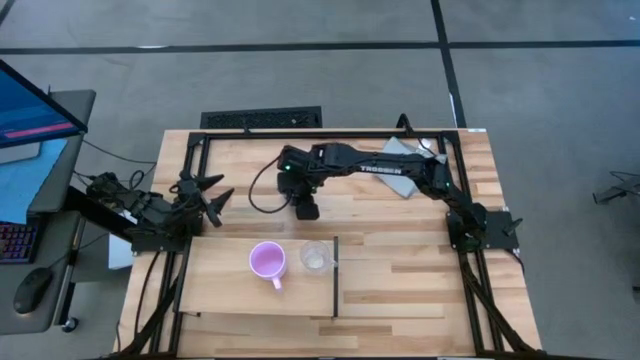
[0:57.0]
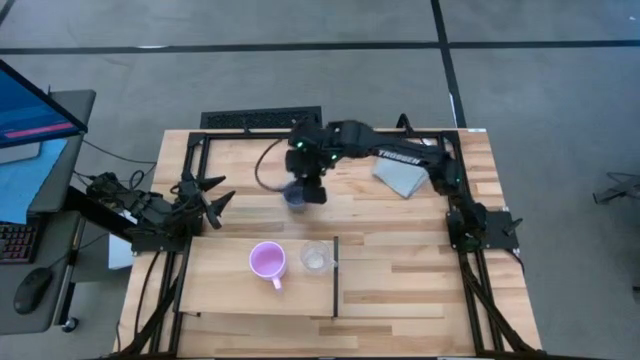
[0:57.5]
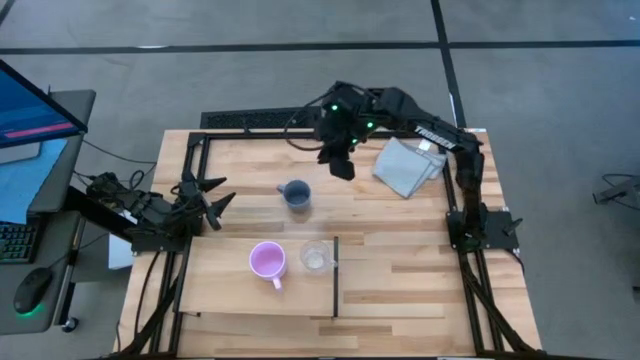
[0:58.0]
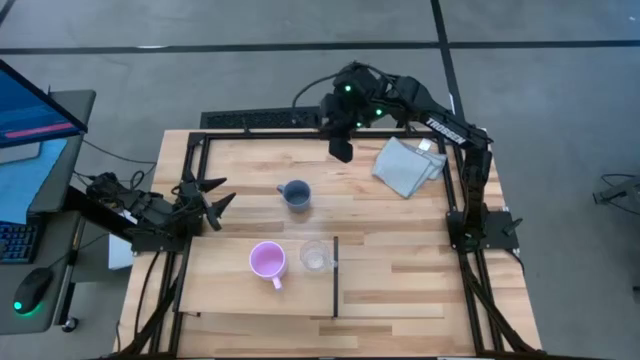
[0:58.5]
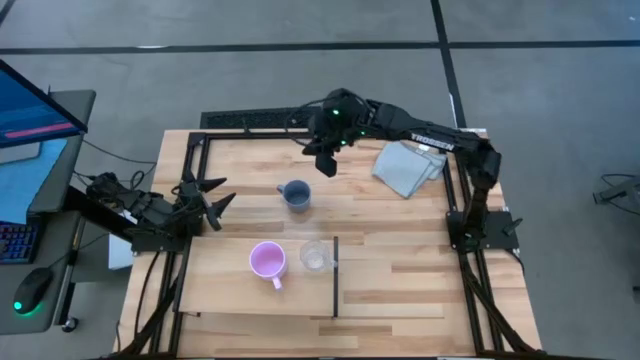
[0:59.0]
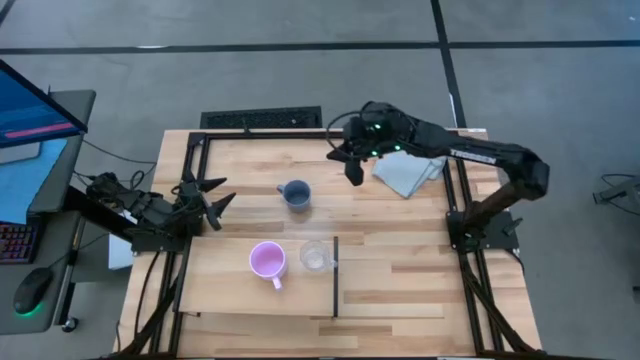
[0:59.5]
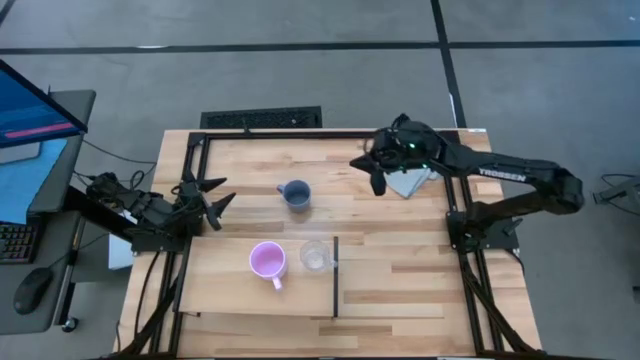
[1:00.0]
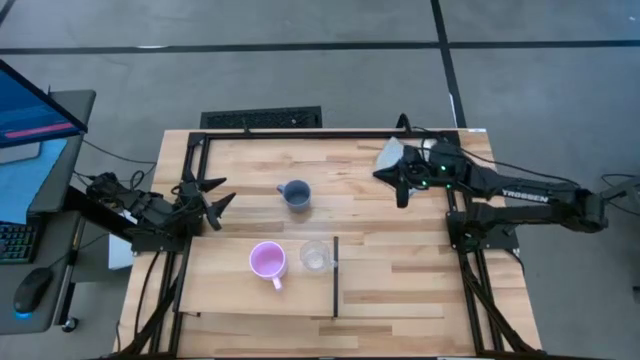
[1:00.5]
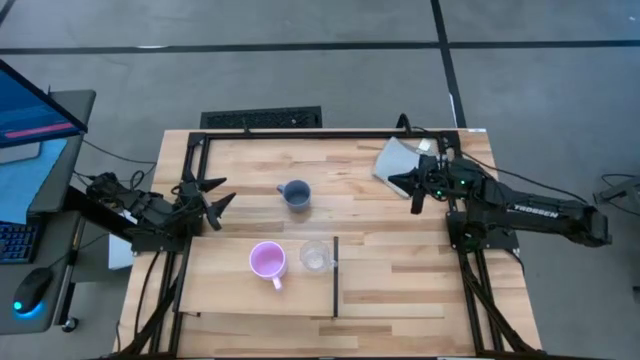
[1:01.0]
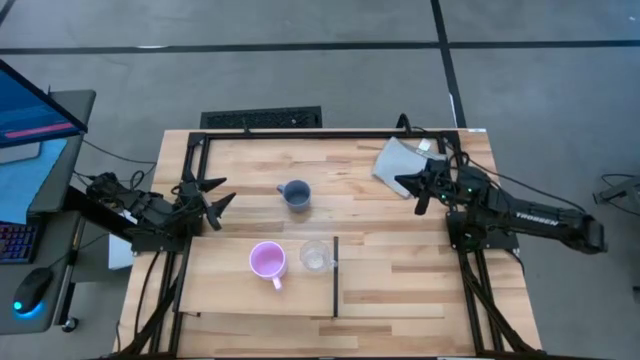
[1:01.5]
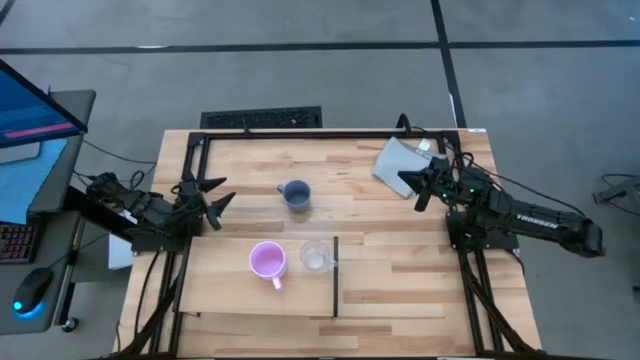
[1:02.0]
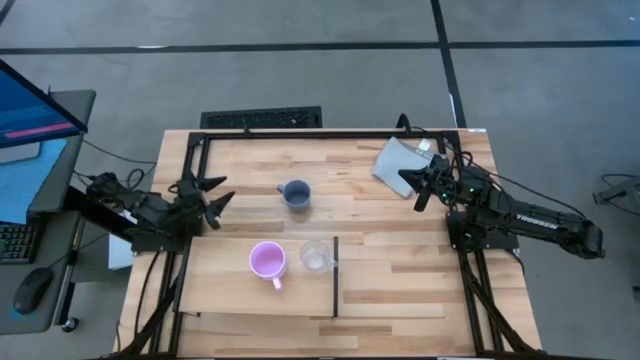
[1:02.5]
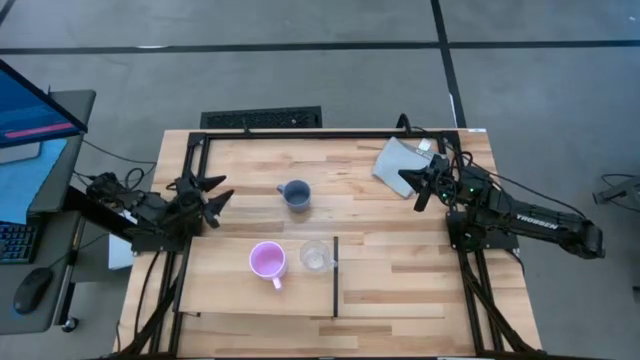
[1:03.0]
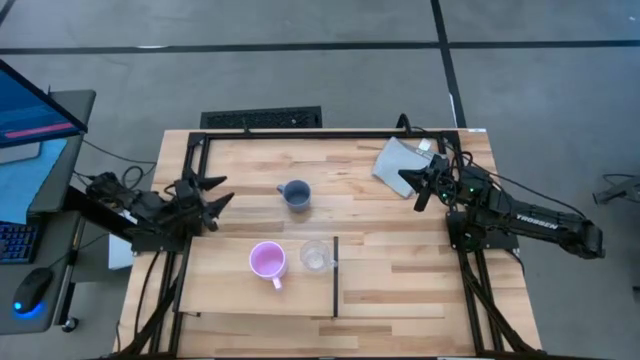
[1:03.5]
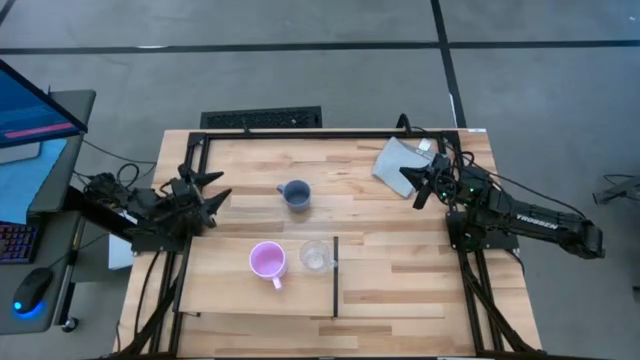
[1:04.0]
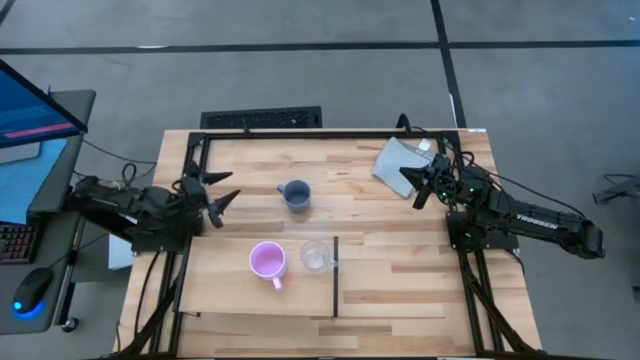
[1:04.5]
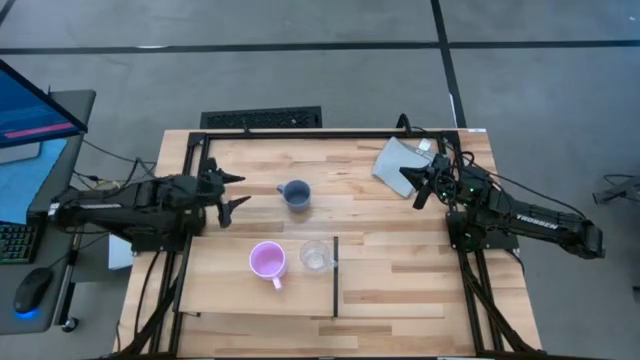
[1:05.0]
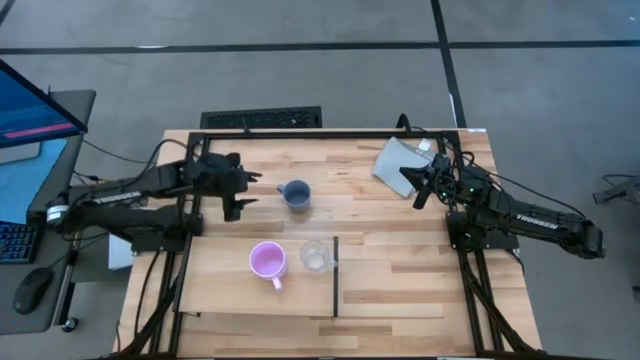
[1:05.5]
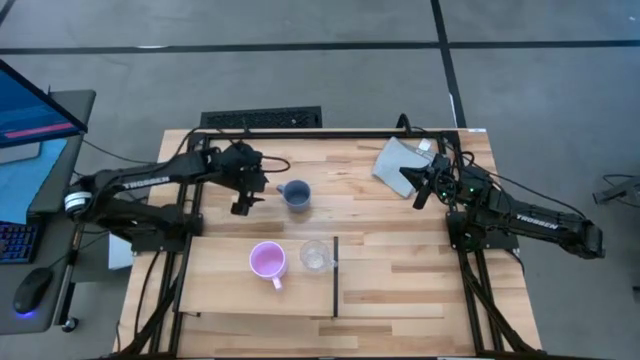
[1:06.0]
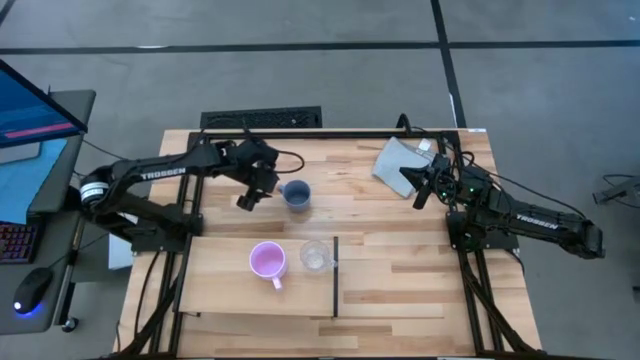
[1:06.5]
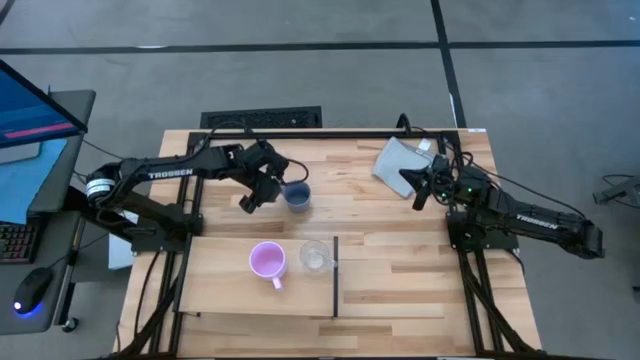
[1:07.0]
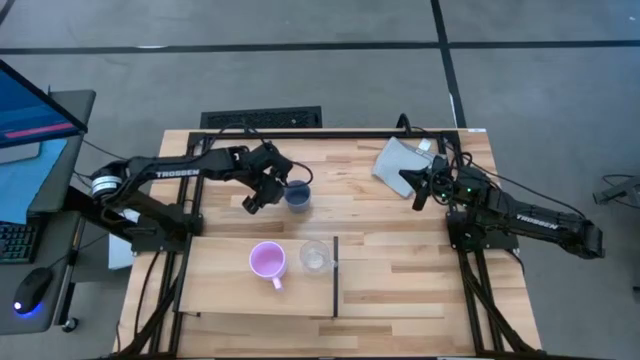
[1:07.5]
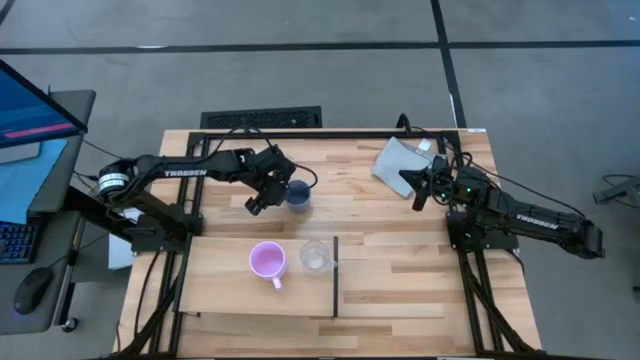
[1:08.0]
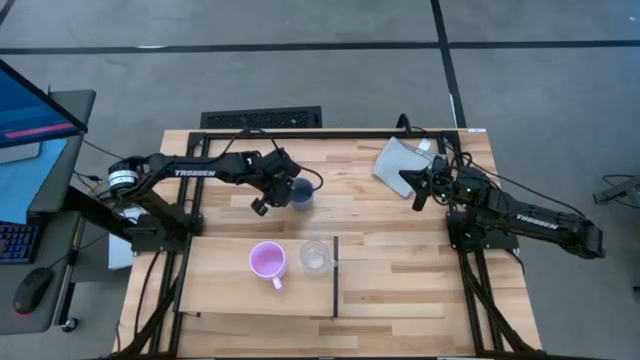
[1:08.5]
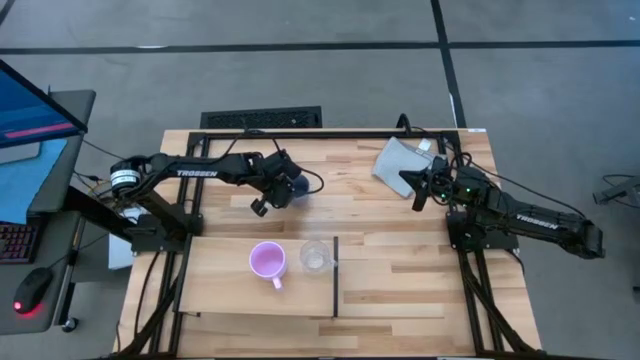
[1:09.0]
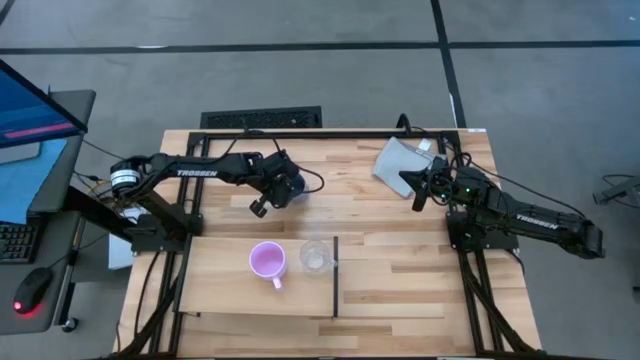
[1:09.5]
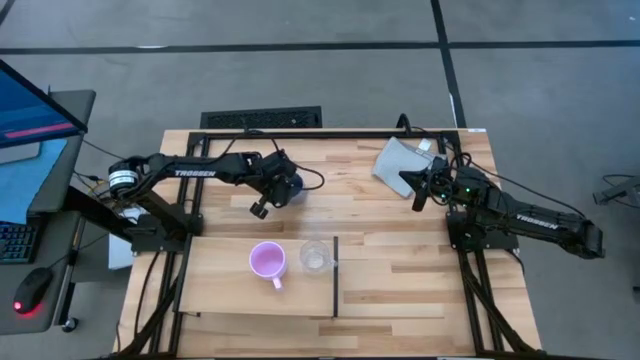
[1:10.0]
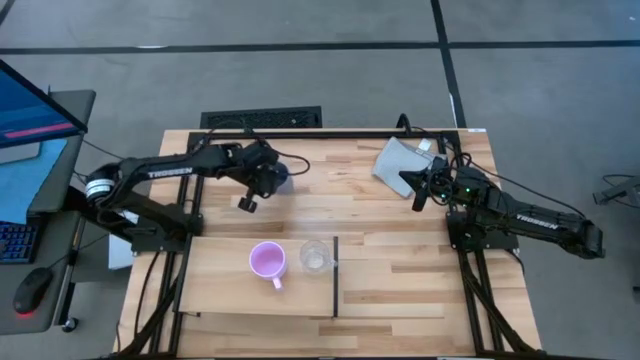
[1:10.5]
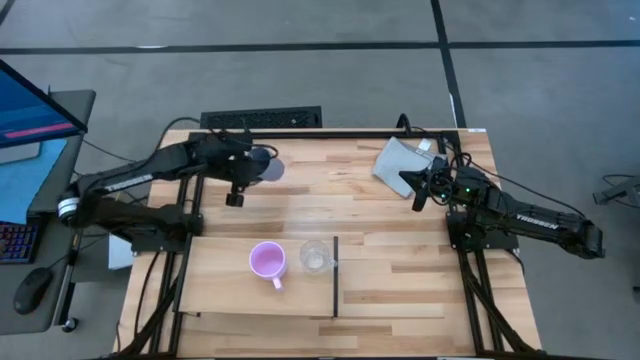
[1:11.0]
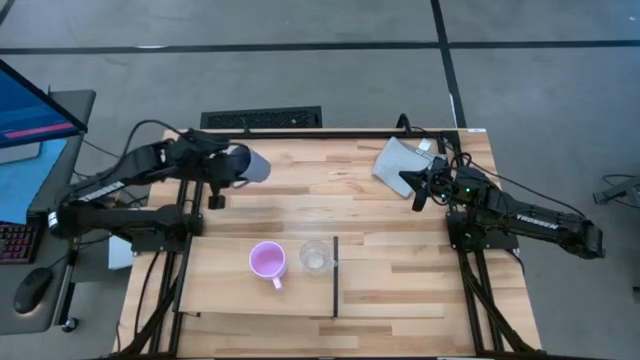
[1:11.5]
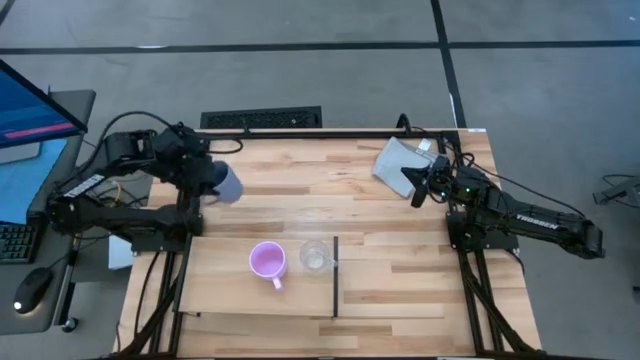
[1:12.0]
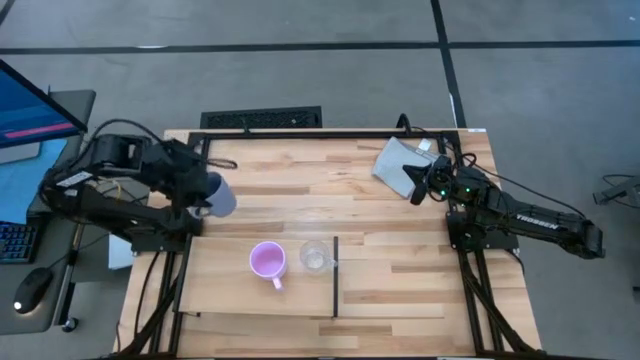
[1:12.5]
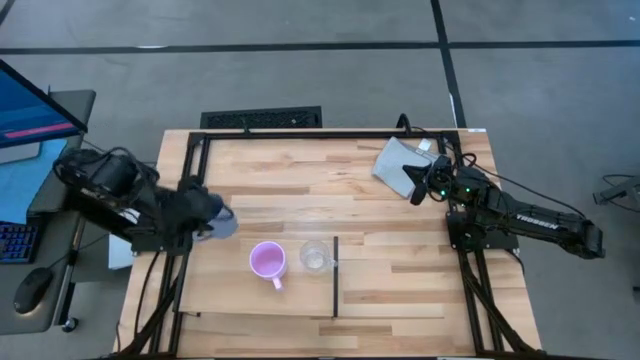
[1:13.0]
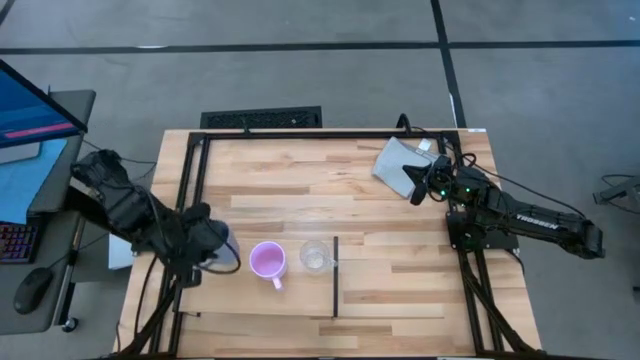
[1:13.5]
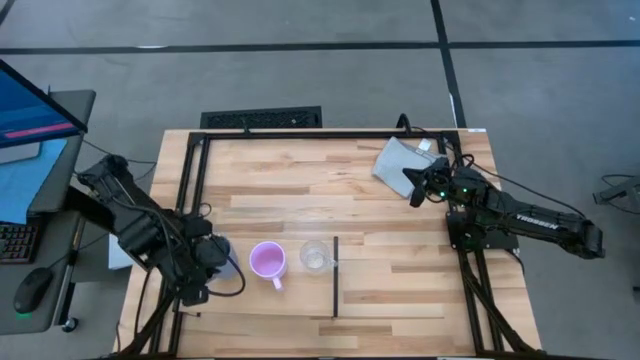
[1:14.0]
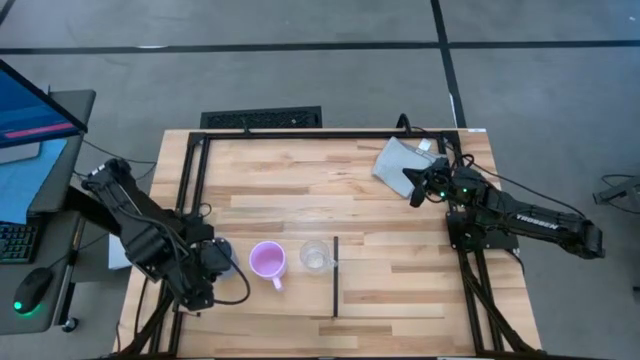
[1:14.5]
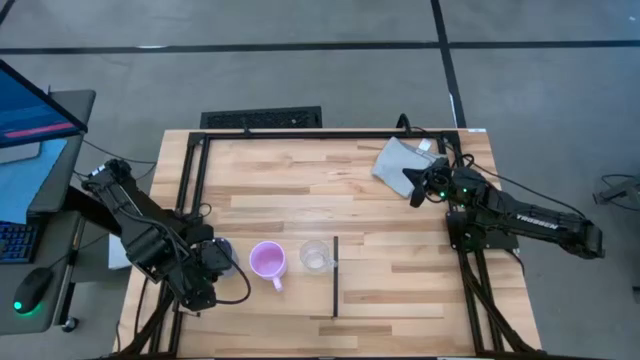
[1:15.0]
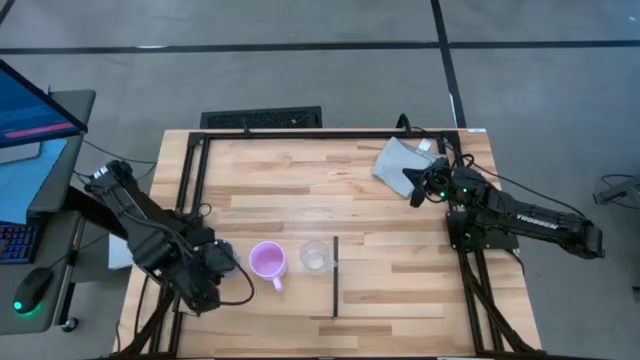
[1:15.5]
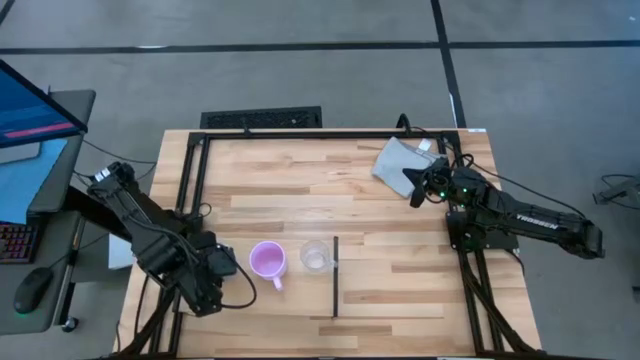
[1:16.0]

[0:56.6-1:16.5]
Task: Stack small to large cups/mugs on shelf
Put the gray mug on the shelf

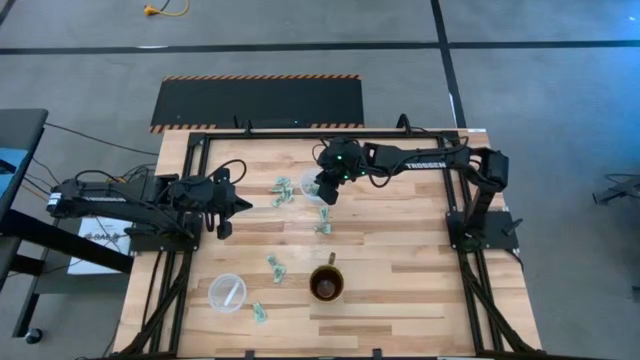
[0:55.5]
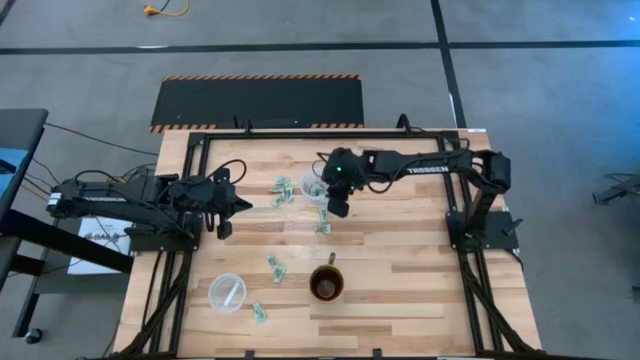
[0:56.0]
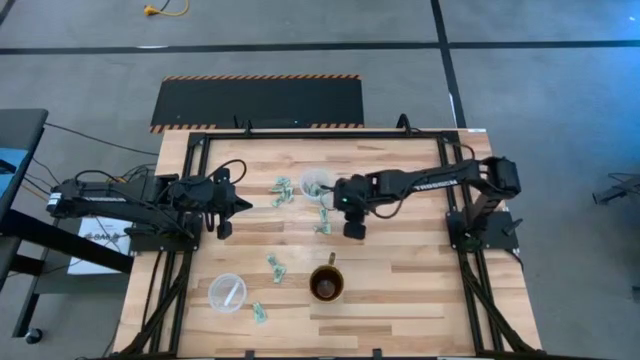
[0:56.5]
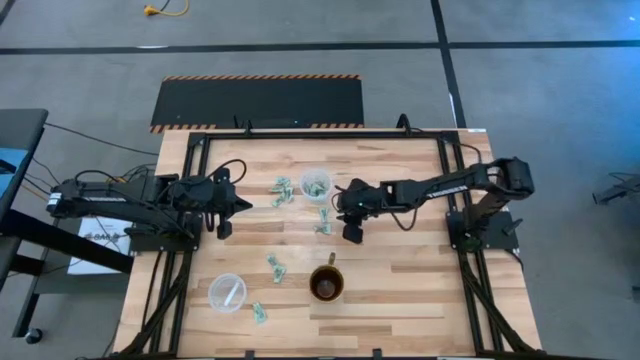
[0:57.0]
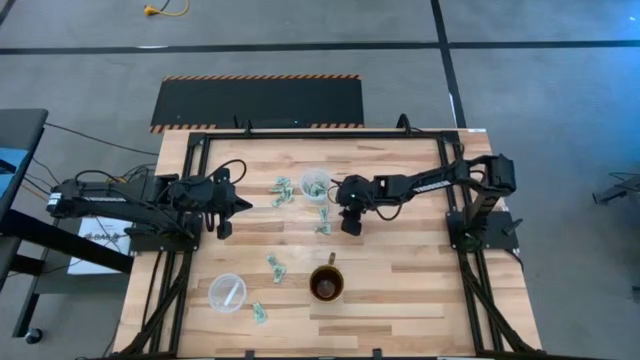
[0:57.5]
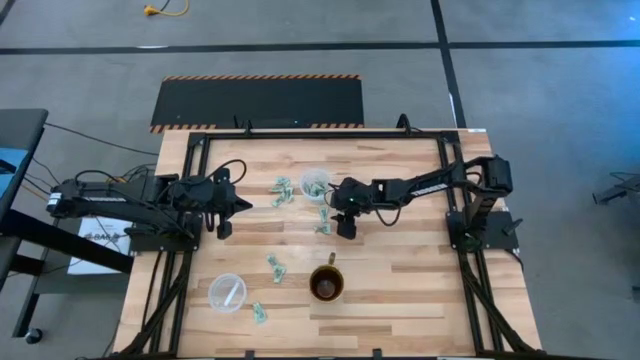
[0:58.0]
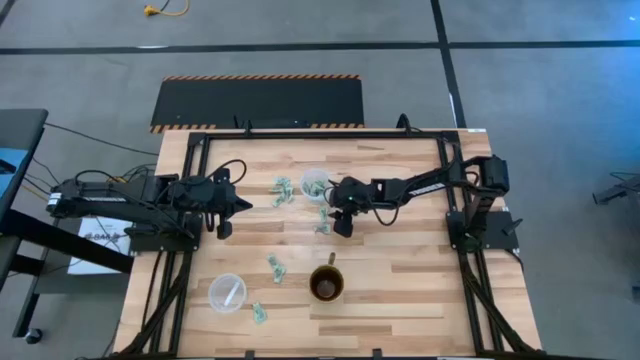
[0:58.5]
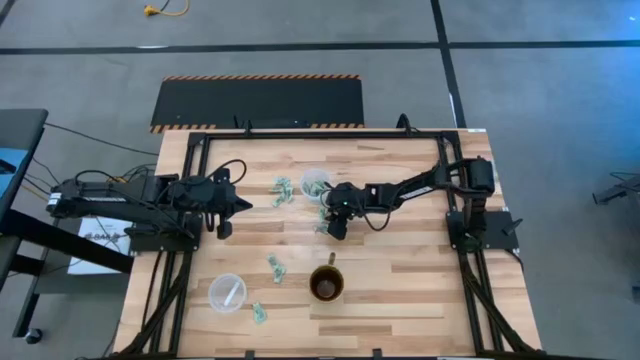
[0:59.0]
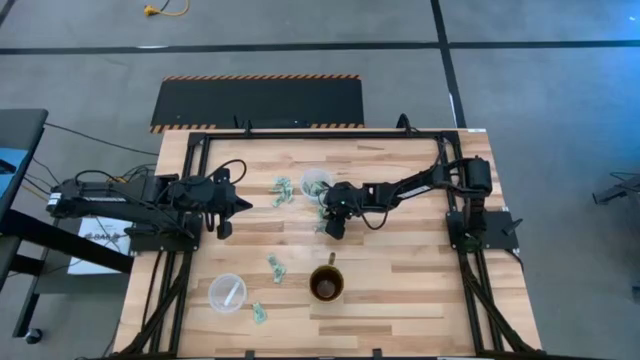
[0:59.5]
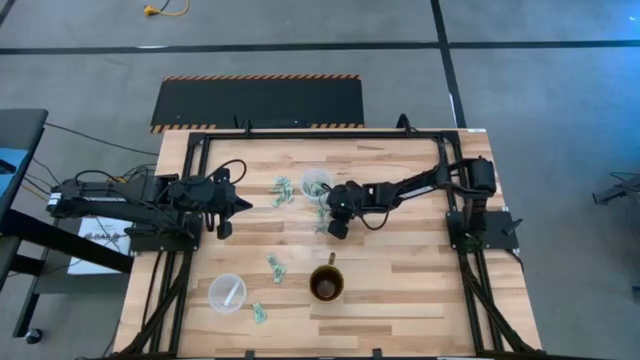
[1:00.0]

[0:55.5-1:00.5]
Task: Pick and place items into bin
Put the stevia packet into the top transparent bin
